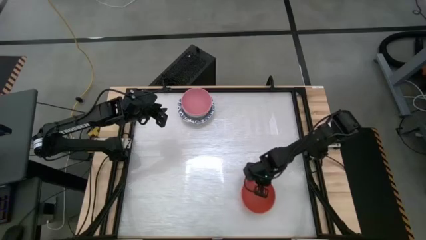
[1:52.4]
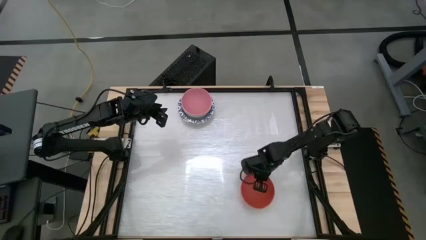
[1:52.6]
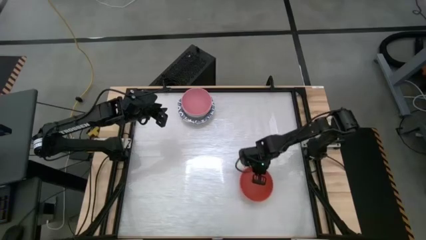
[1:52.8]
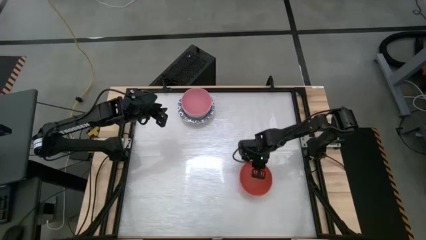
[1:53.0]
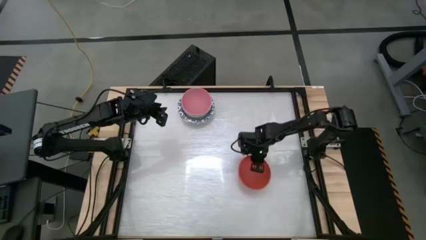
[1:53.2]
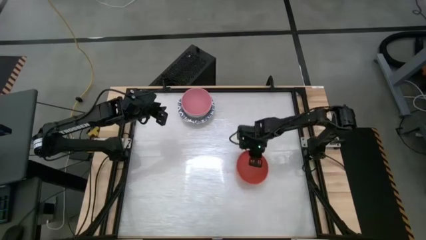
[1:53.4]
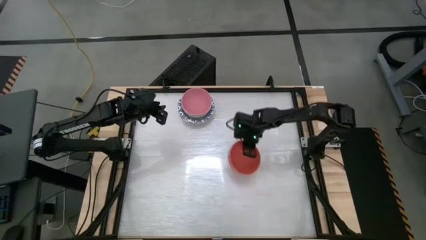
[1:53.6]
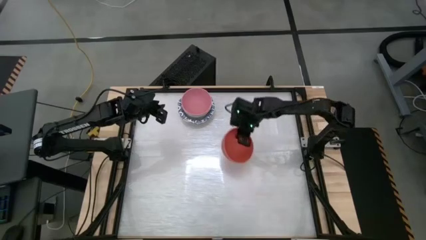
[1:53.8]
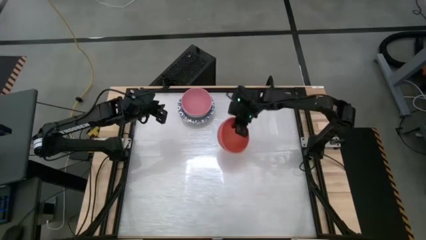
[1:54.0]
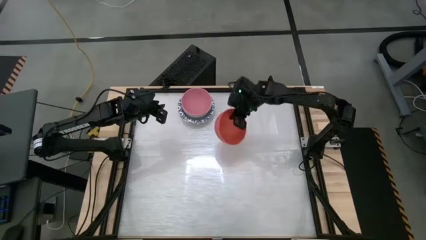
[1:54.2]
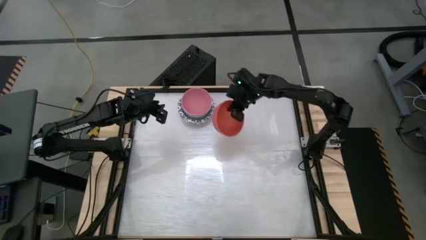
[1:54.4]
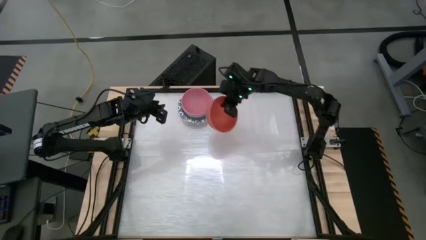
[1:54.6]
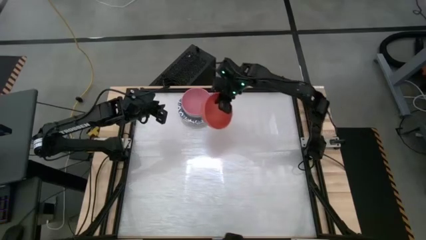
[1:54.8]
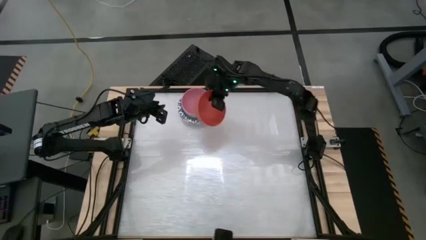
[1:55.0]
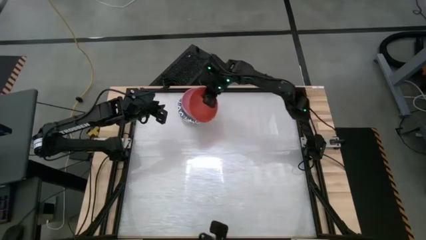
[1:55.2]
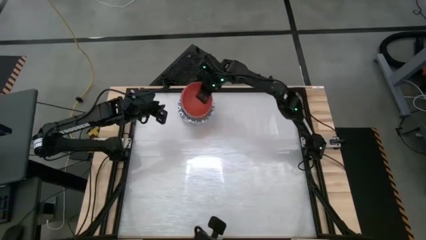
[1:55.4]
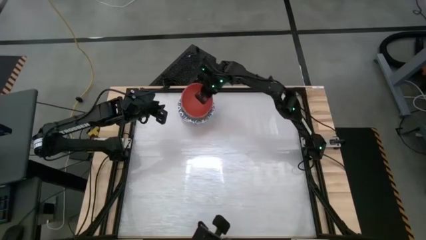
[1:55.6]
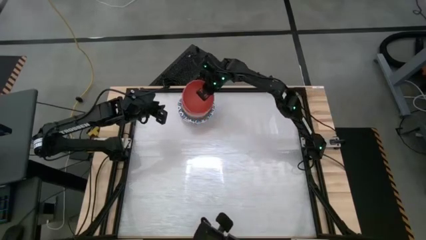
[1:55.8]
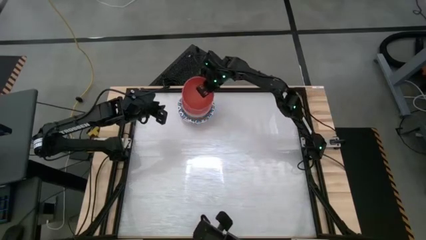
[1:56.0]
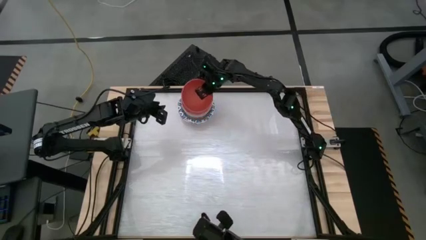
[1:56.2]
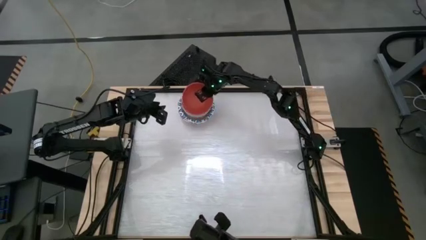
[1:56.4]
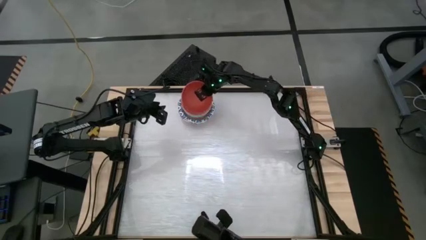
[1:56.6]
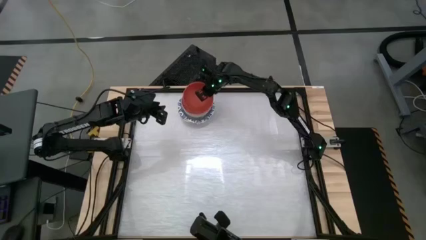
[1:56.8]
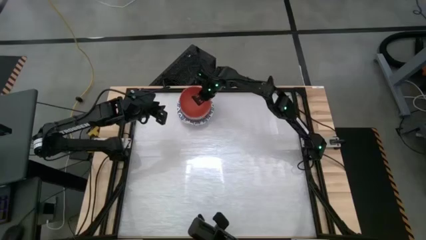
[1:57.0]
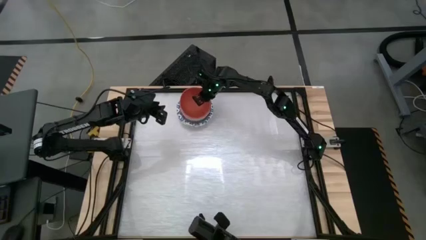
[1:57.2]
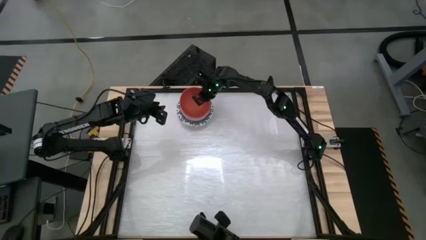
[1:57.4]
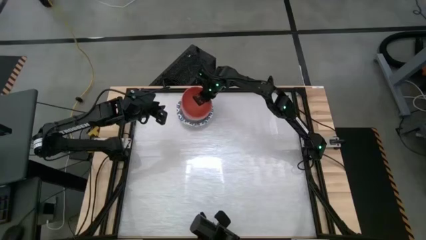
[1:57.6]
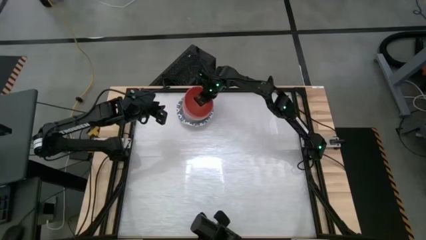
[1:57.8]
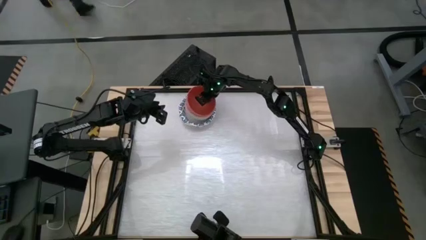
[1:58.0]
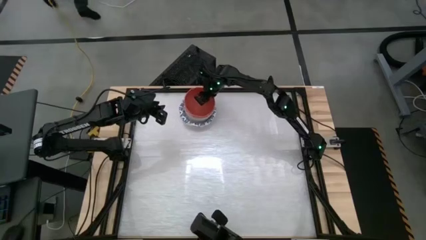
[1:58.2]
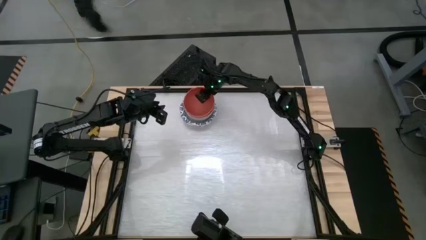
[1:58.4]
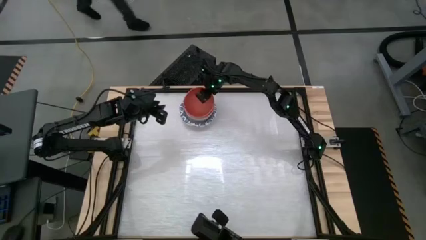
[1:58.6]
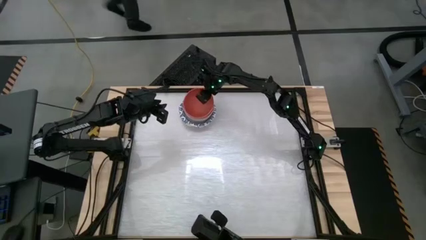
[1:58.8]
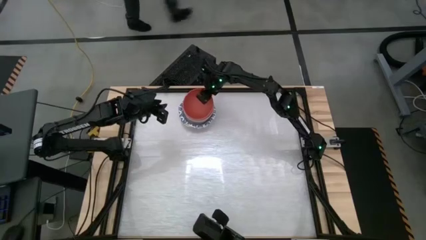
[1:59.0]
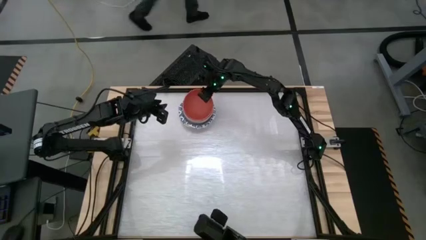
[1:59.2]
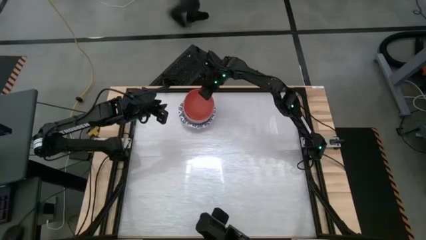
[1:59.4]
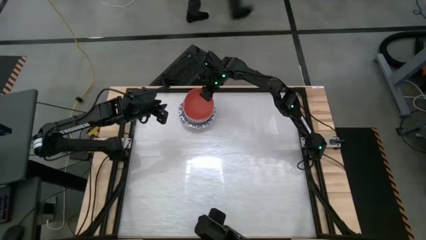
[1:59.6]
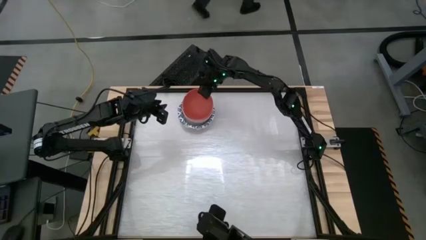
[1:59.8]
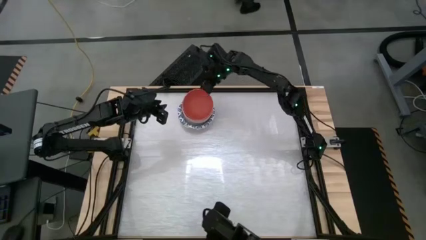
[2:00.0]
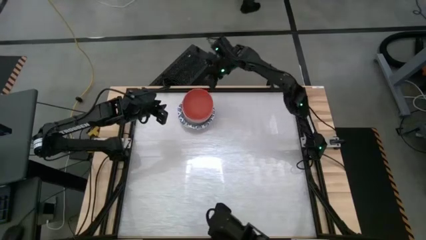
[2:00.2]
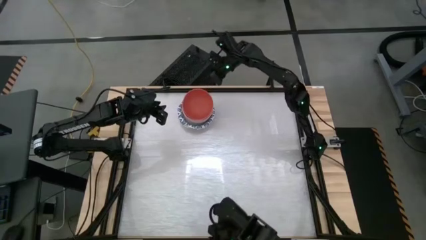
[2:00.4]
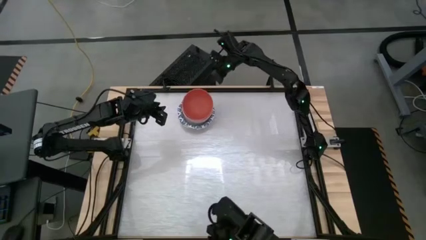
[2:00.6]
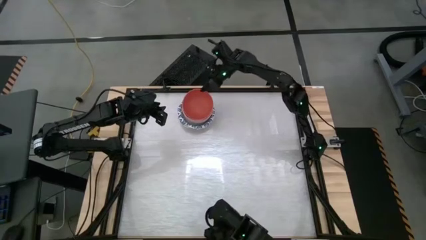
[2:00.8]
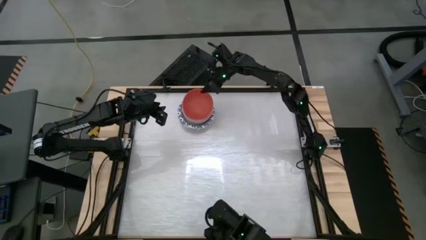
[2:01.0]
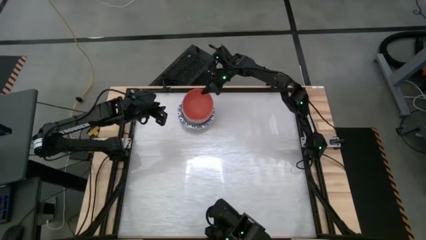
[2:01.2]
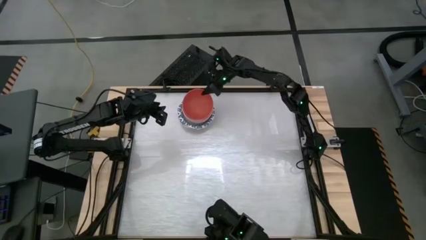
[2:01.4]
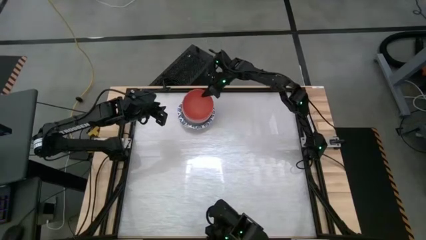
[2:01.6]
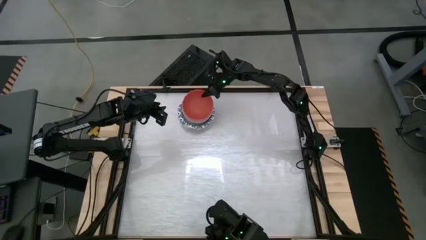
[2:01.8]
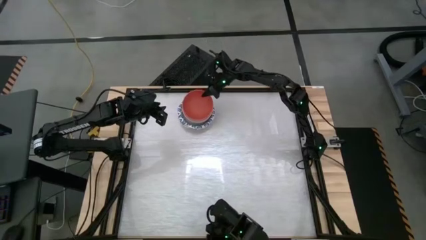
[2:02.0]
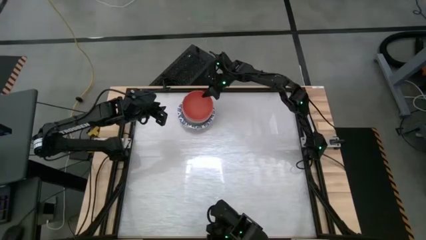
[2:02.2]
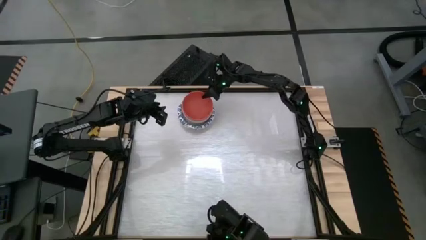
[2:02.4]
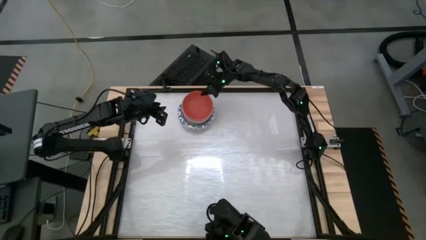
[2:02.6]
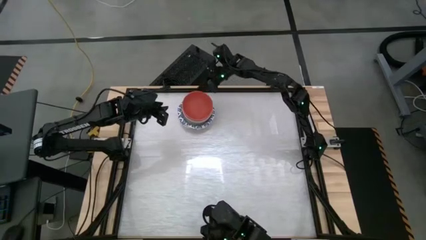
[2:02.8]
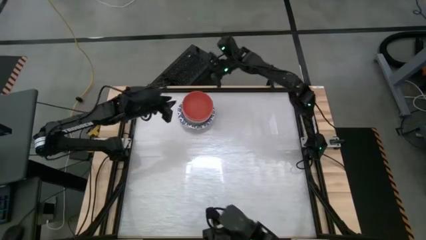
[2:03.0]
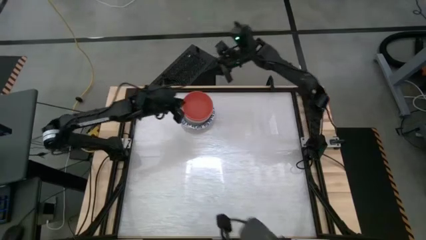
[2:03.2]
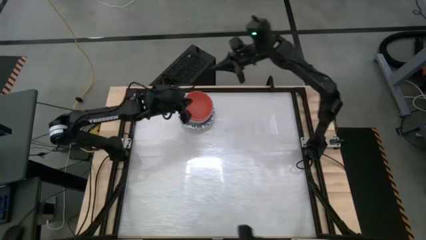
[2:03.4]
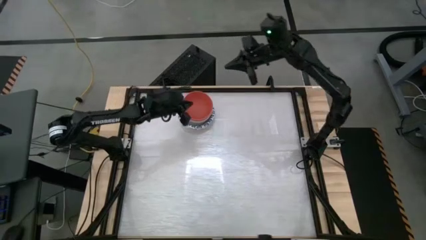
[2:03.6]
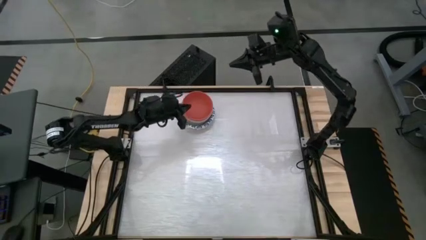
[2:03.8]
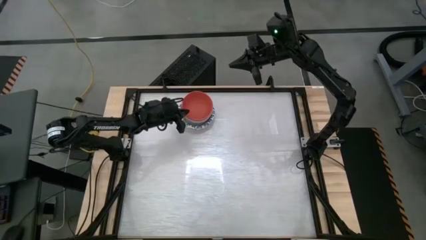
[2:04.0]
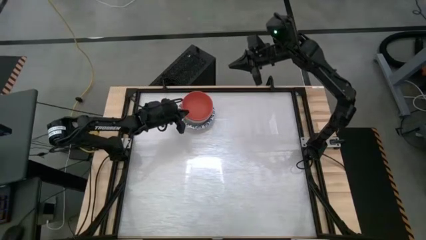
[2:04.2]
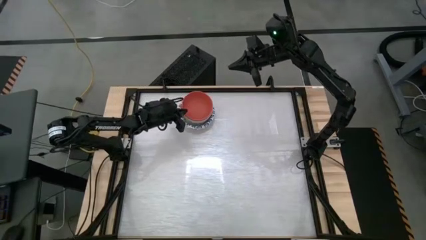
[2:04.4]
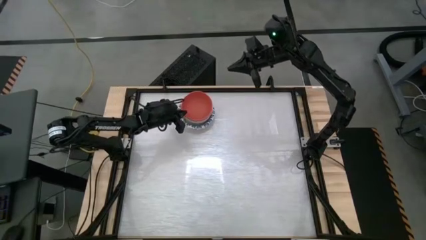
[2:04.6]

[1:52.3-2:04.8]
Stack the orange bowl on top of the pink bowl
